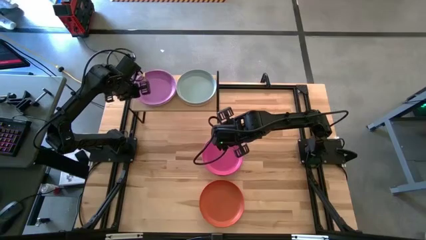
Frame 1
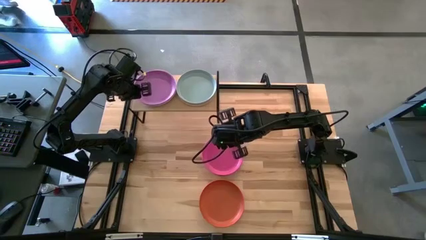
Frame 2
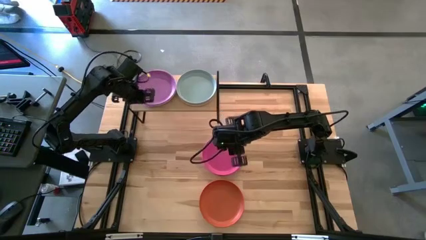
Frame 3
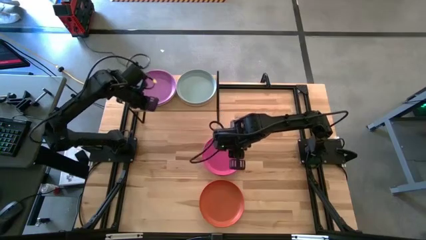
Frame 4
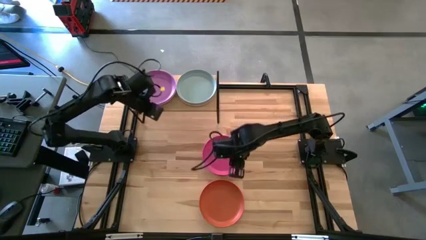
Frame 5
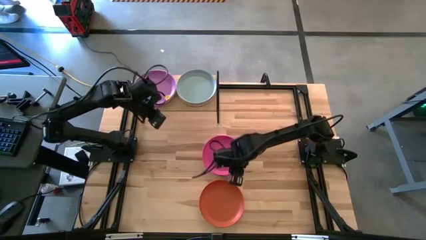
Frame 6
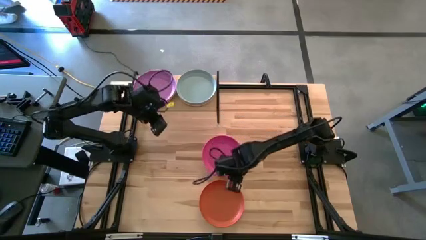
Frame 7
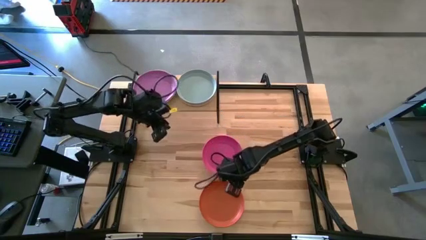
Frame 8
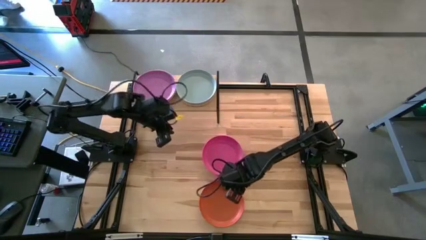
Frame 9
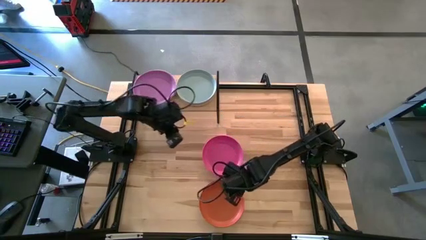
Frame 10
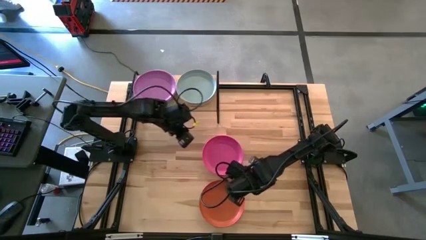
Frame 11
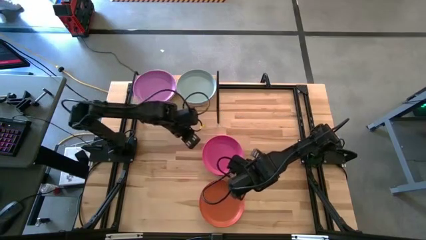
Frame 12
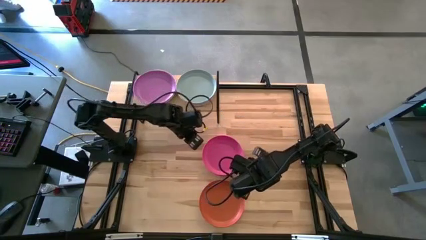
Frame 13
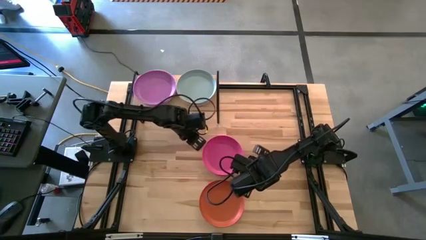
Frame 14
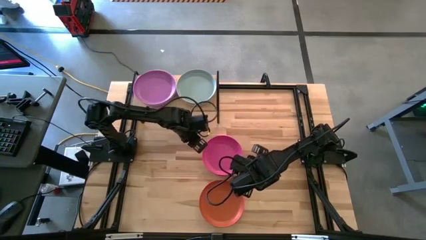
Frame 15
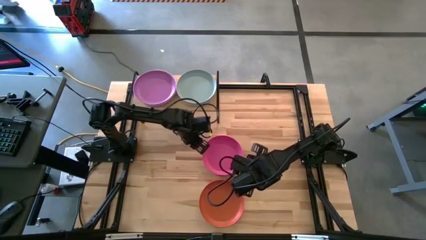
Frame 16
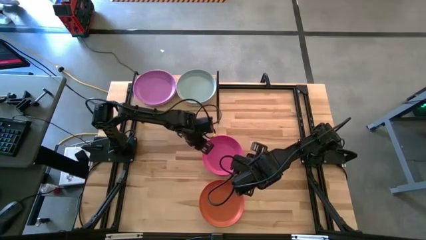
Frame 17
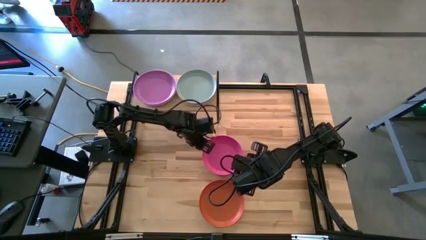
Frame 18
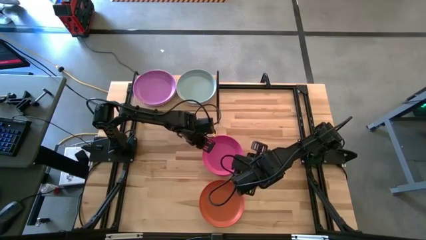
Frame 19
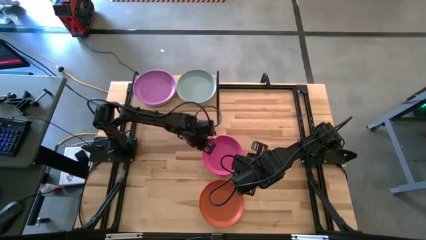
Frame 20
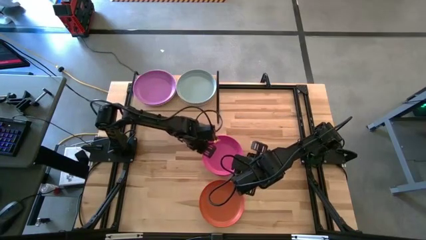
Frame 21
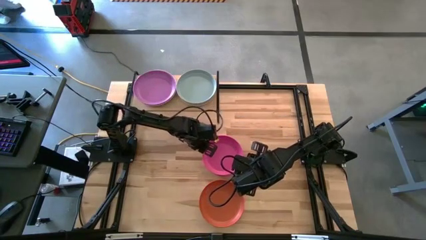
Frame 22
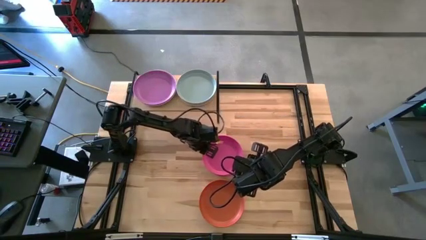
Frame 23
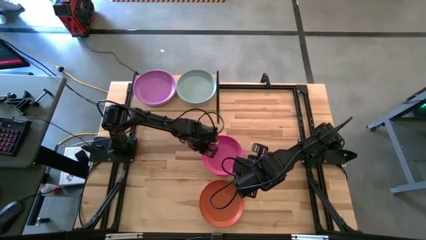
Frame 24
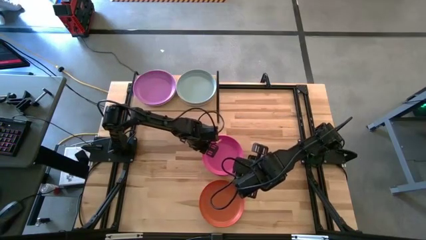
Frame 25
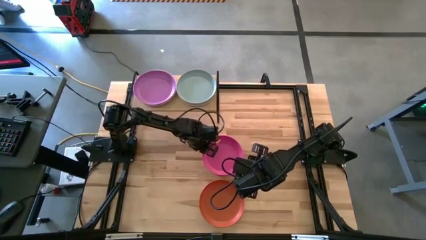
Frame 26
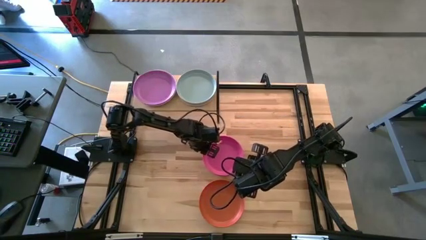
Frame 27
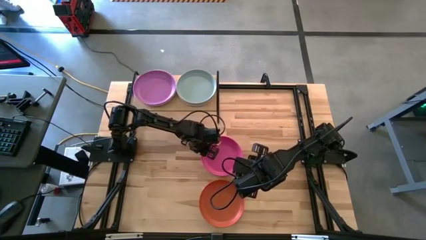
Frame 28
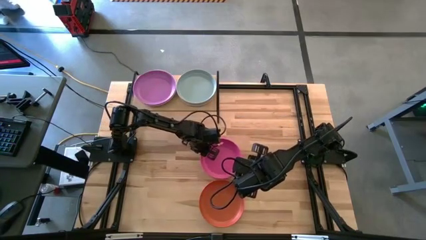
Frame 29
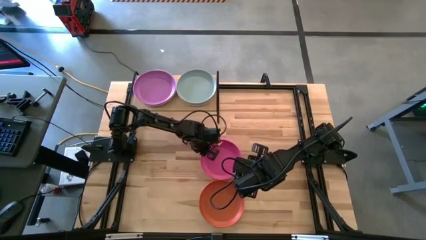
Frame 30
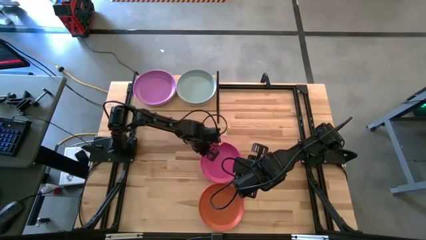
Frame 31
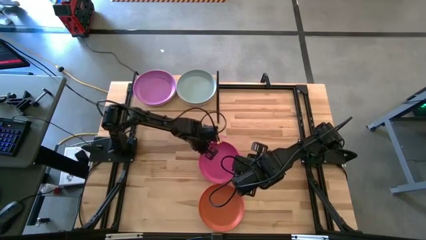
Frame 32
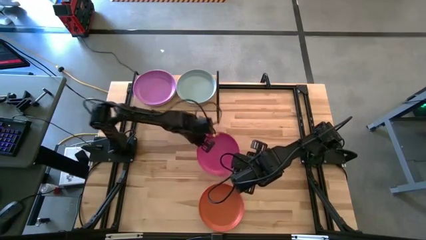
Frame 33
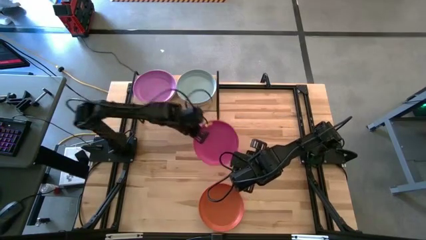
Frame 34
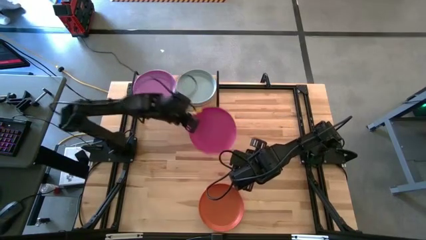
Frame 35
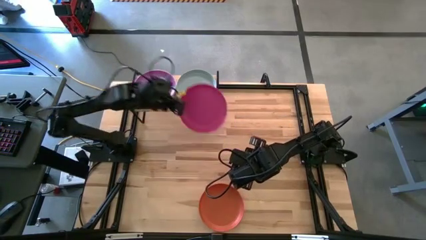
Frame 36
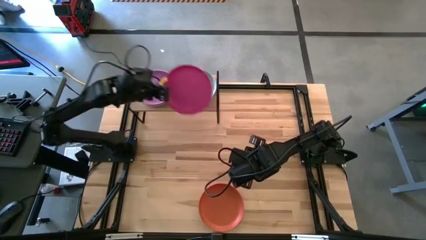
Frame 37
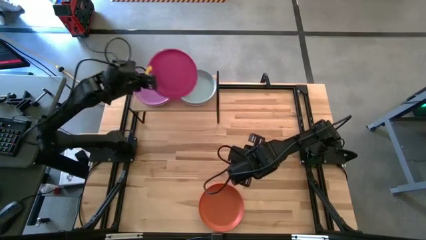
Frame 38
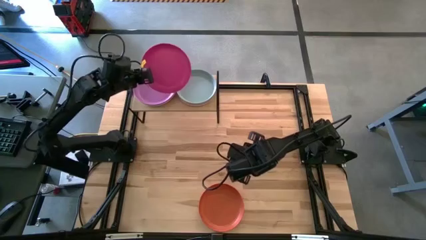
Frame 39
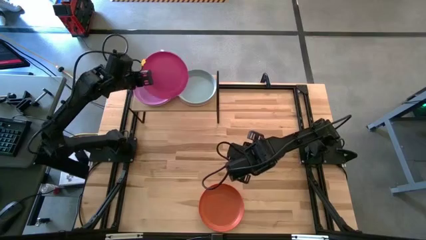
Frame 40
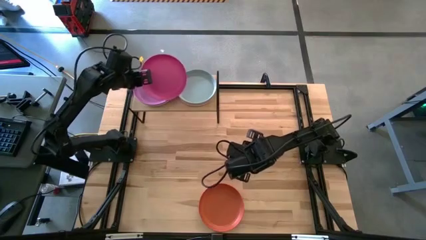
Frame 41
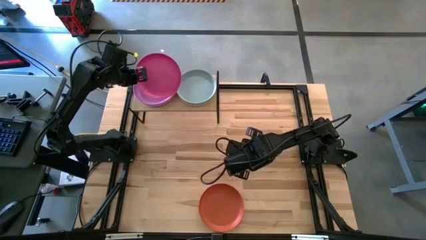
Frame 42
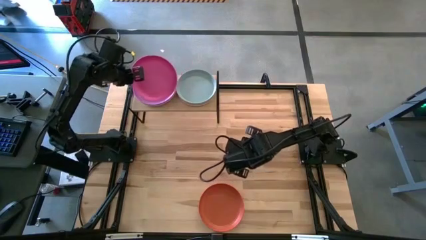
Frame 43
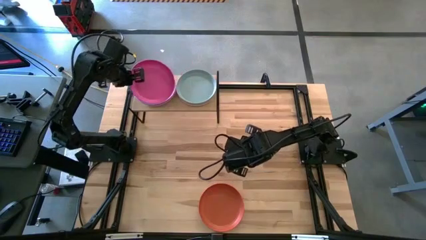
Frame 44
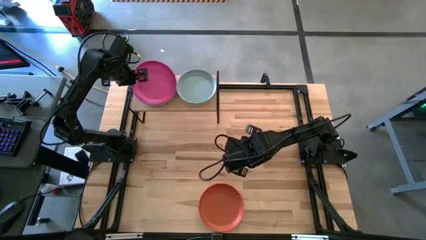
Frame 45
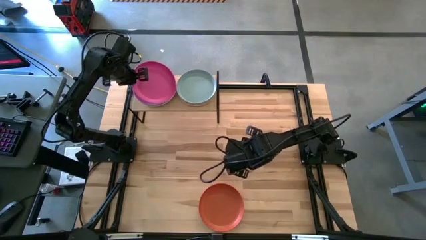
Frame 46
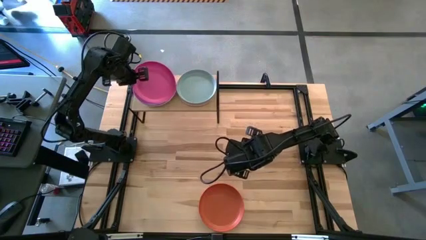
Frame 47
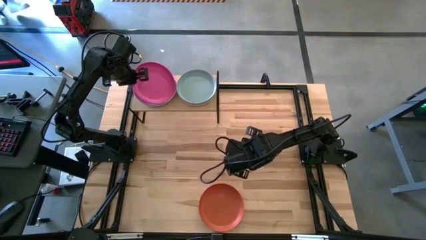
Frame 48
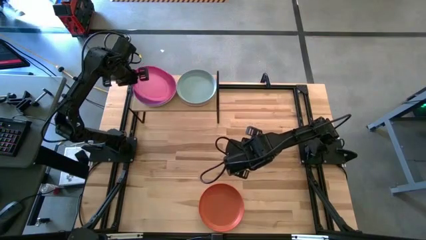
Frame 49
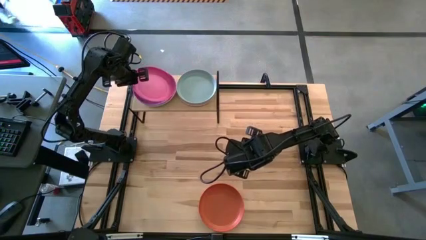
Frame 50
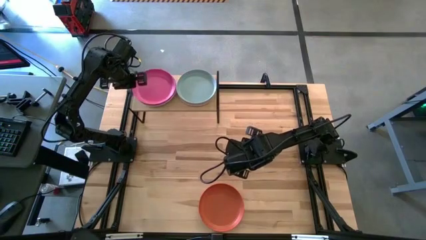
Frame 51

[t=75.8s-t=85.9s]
Task: Place and stack plates onto a shelf
Stack the pink plate on top of the purple plate on the shelf

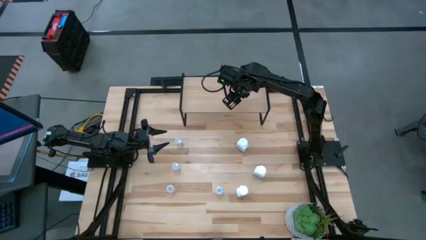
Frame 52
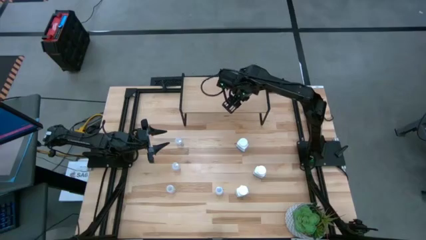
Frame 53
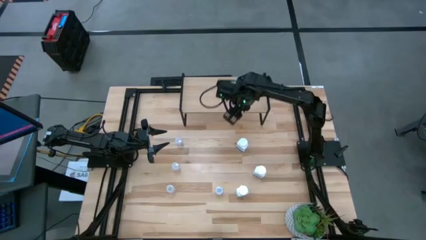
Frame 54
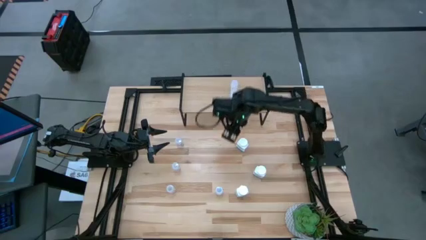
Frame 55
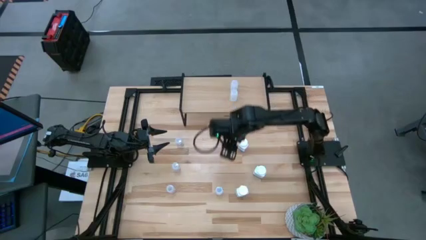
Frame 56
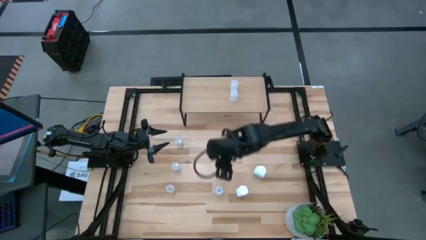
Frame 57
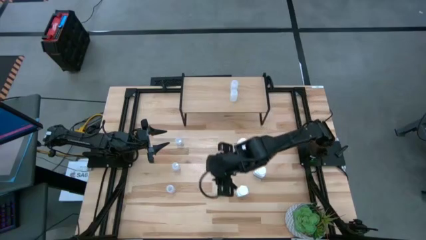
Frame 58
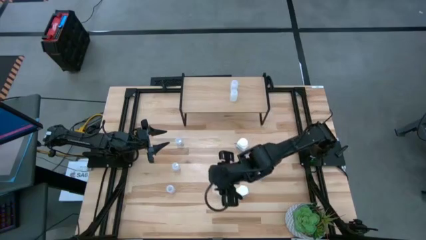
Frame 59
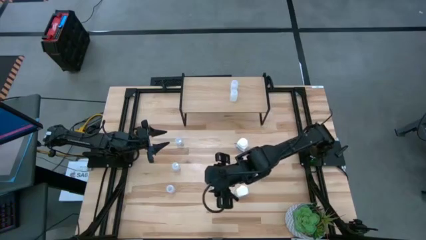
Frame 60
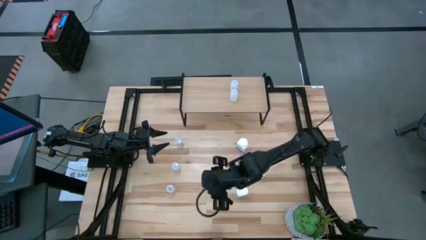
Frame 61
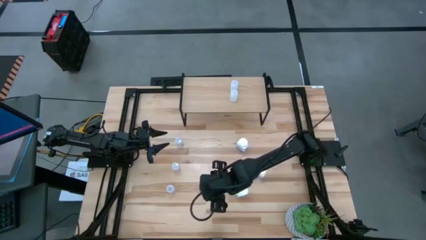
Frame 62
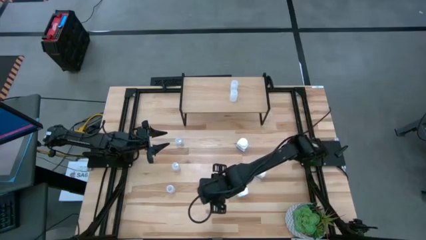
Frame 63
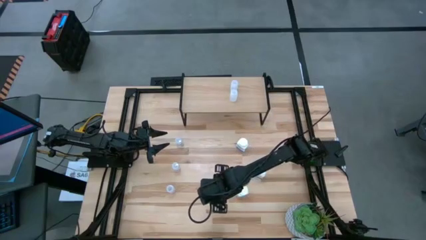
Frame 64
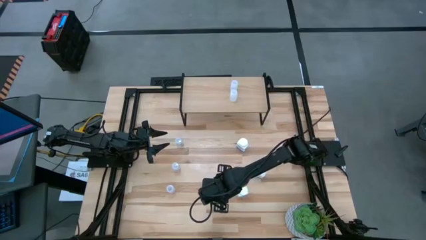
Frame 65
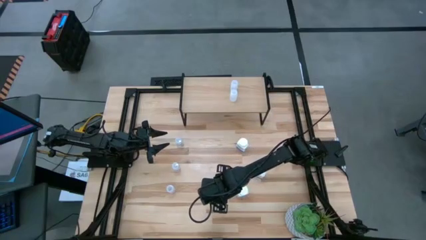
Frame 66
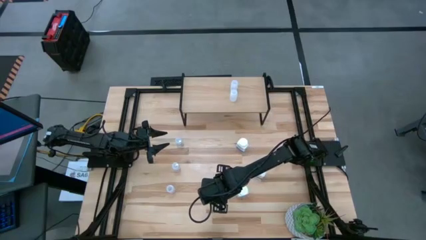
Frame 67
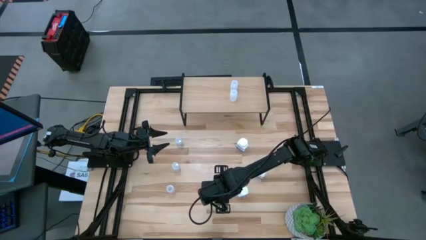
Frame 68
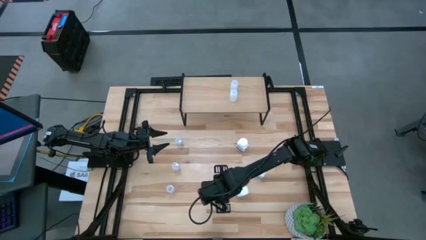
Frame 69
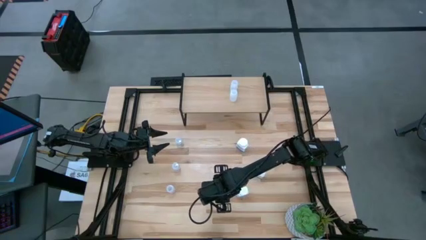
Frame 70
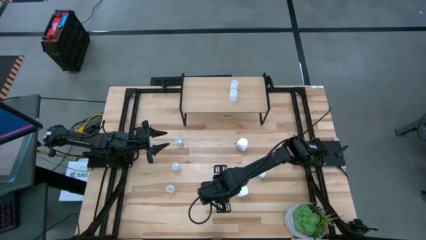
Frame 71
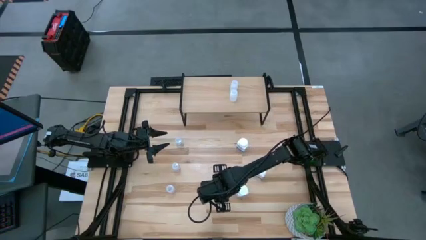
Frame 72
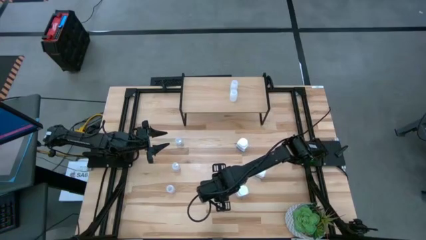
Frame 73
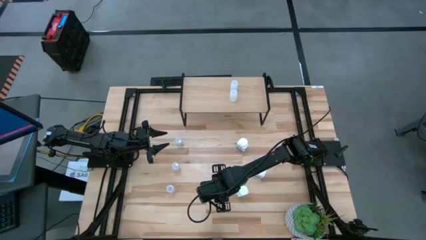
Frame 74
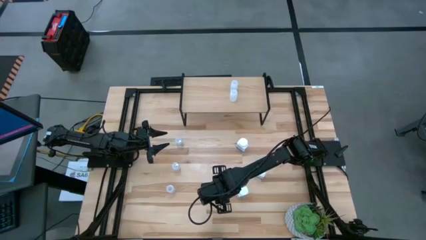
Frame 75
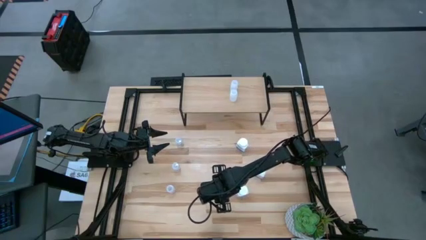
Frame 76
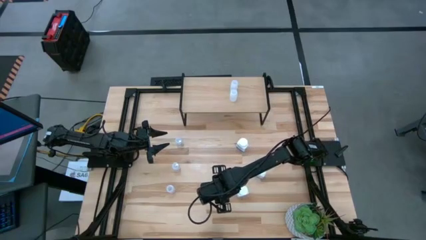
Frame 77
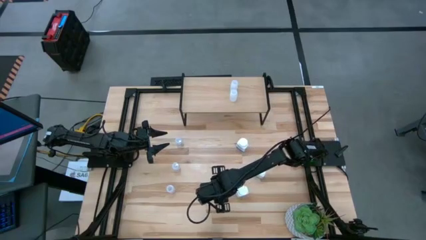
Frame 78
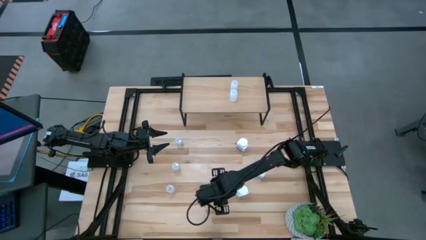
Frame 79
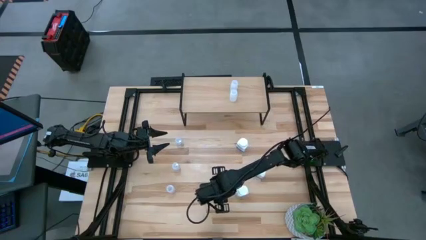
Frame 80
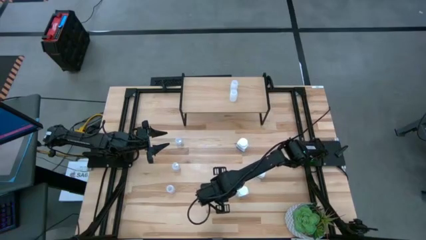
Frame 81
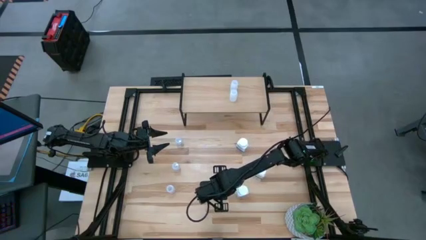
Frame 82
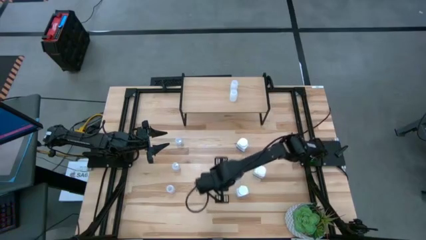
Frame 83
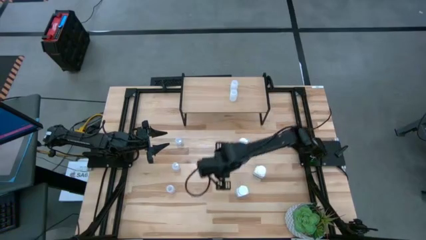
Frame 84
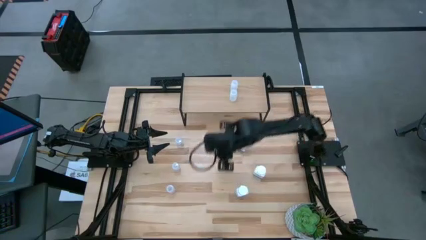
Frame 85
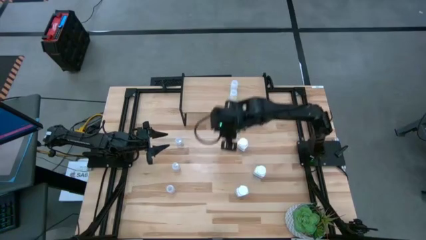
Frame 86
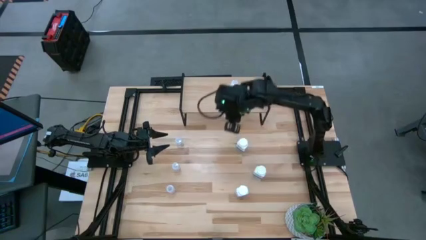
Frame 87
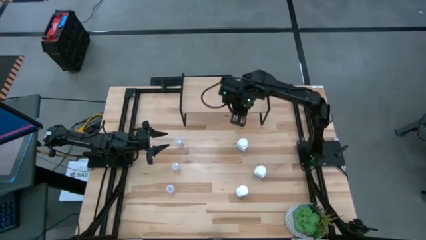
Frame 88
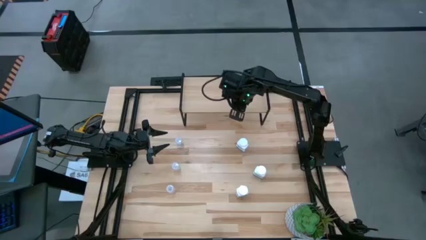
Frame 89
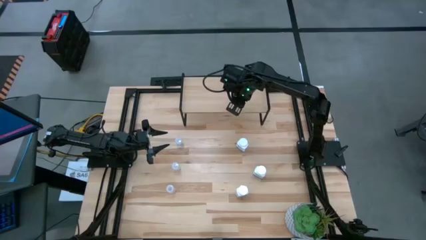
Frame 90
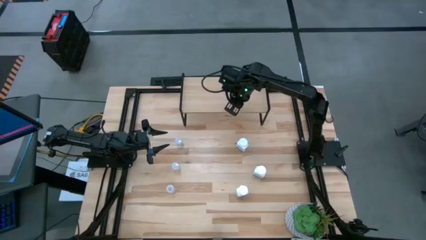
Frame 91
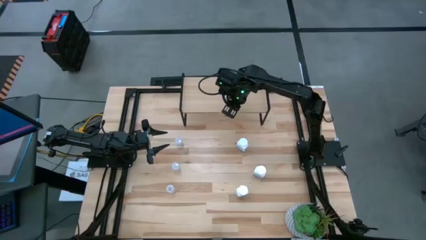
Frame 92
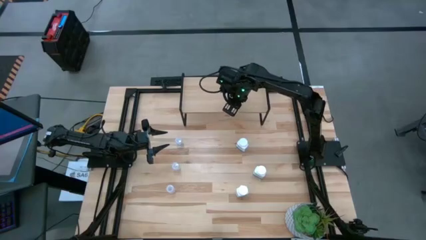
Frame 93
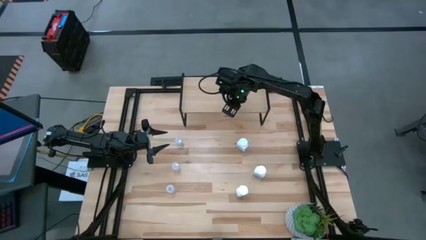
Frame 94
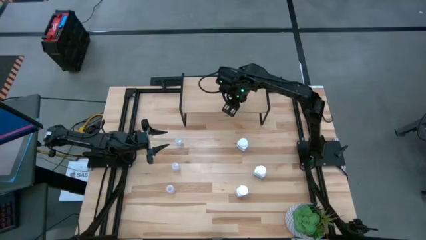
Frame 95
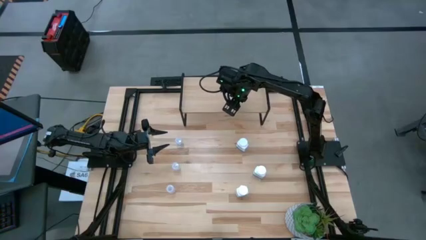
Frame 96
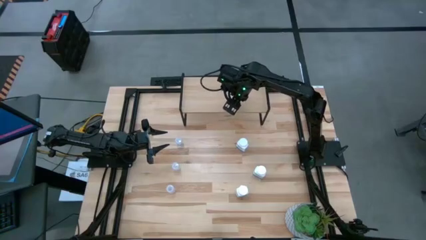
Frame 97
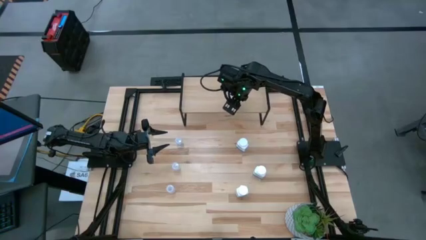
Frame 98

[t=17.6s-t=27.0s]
Task: Pick and place medicine bottles onto shelf by color
Put the small white pill bottle on the shelf aligned with the other small white pill bottles
